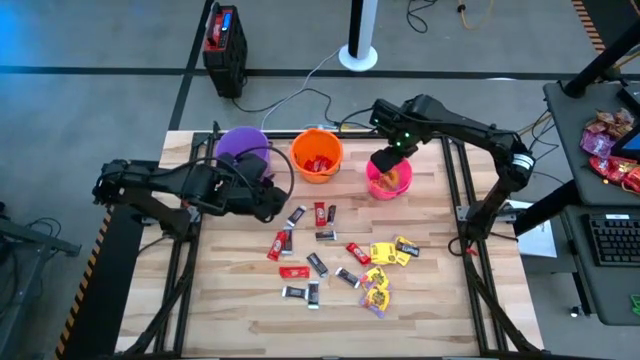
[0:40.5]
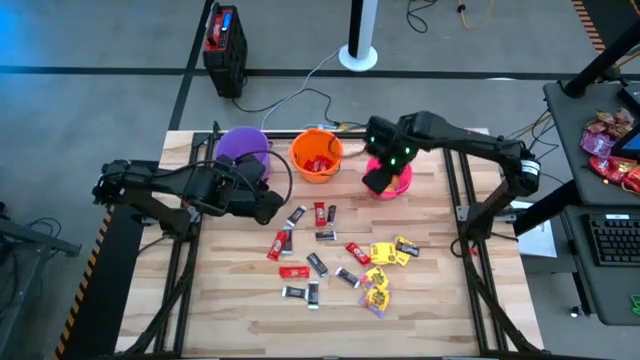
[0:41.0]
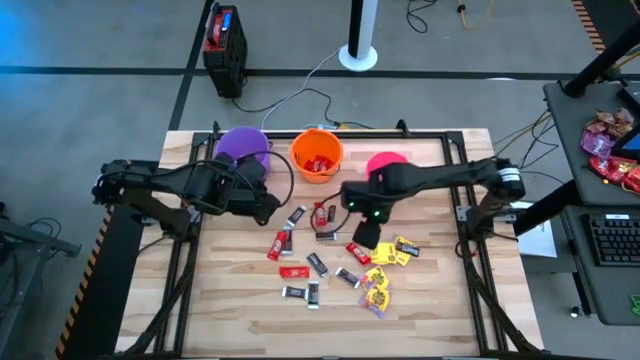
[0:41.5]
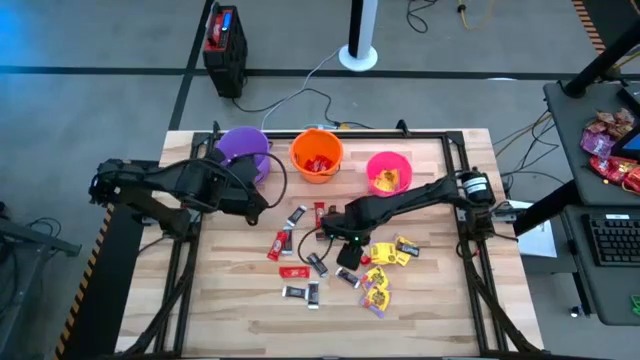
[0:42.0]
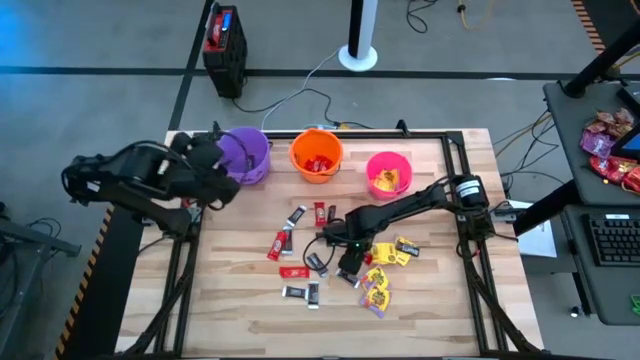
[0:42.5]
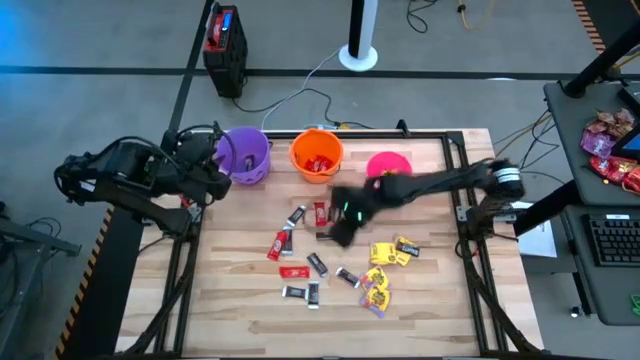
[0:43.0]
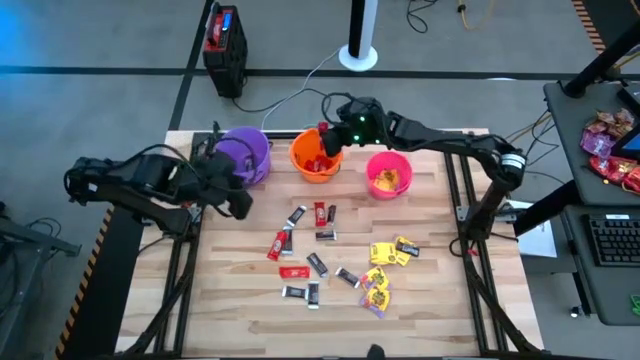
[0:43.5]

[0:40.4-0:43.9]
Task: Sort candy by brand, put in halloween buckets
Put the red candy into the orange bucket

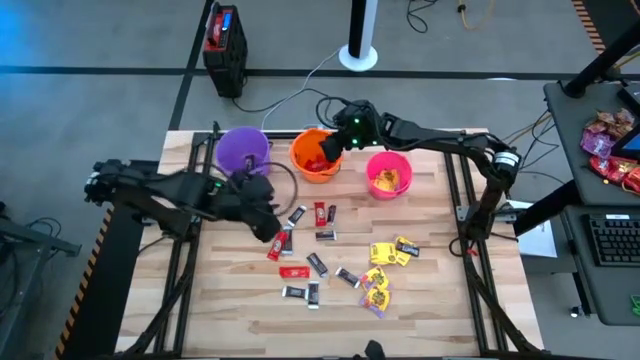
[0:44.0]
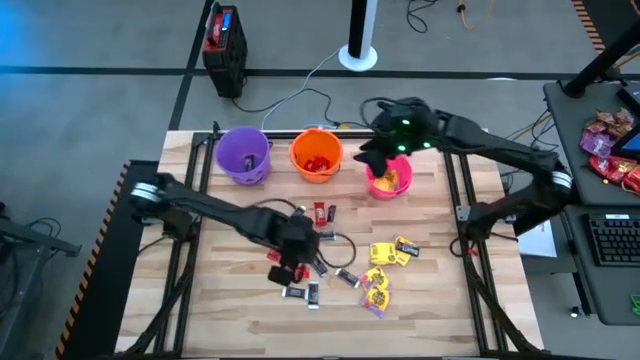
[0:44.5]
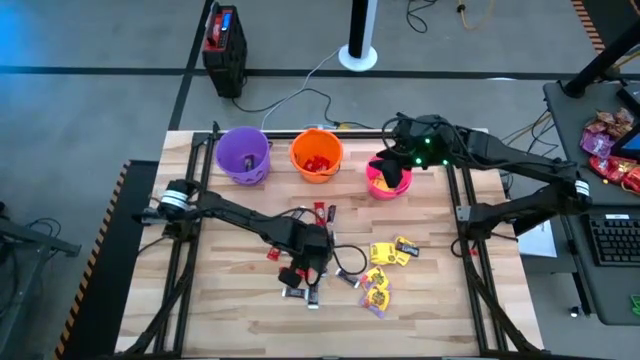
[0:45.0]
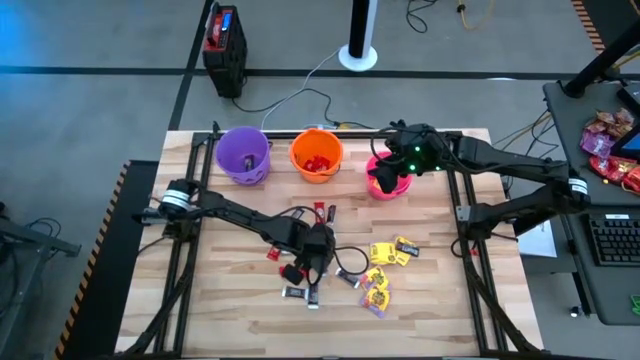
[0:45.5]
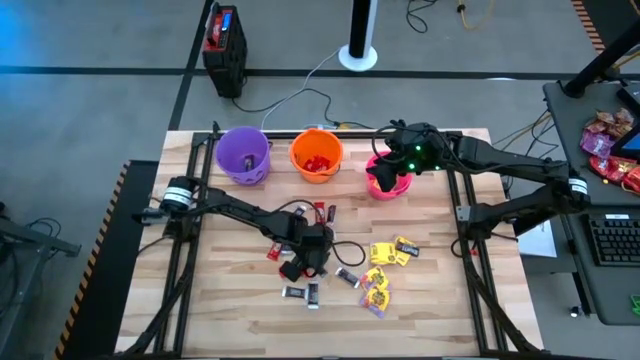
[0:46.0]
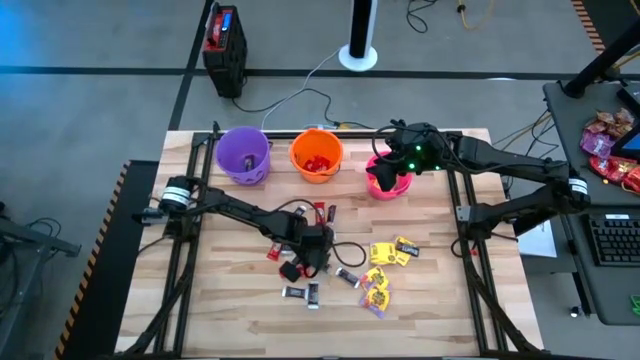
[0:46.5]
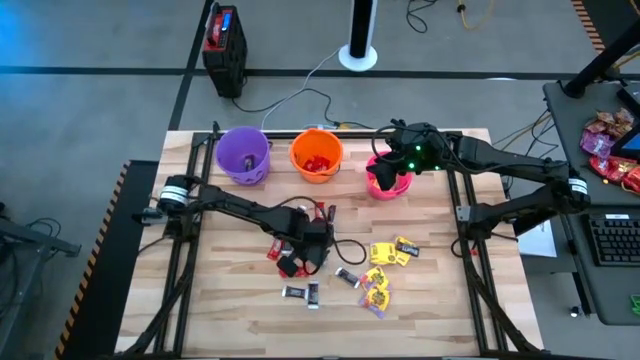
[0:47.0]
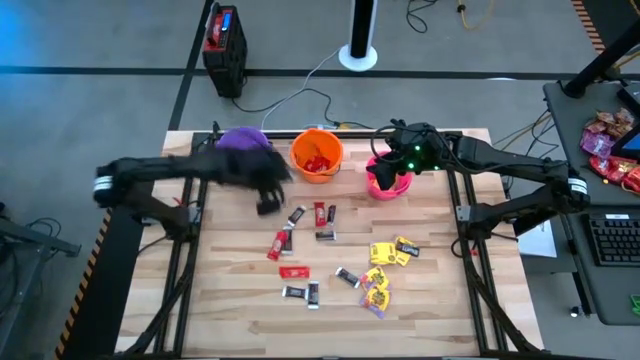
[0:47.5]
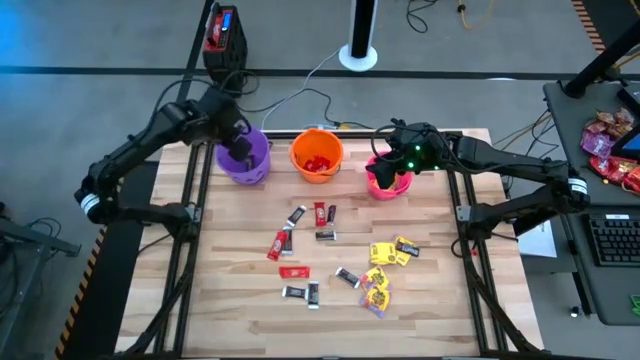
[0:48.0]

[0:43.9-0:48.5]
Put the black candy into the violet bucket

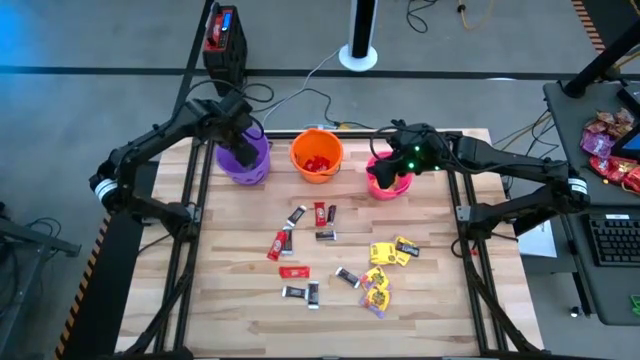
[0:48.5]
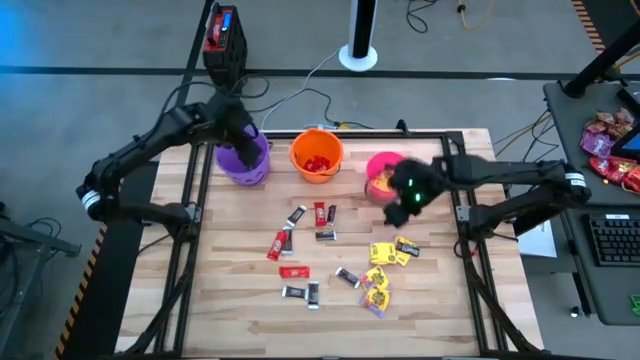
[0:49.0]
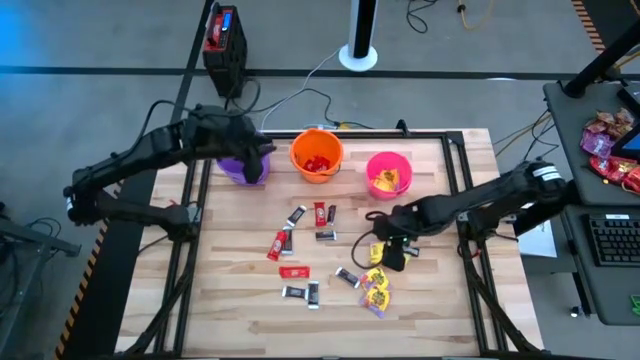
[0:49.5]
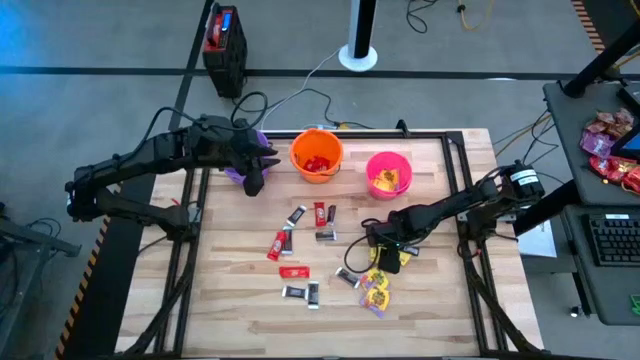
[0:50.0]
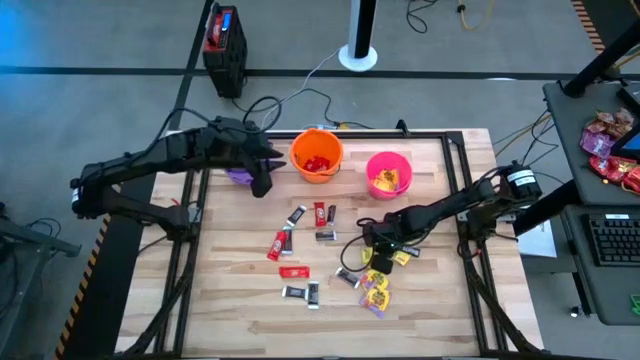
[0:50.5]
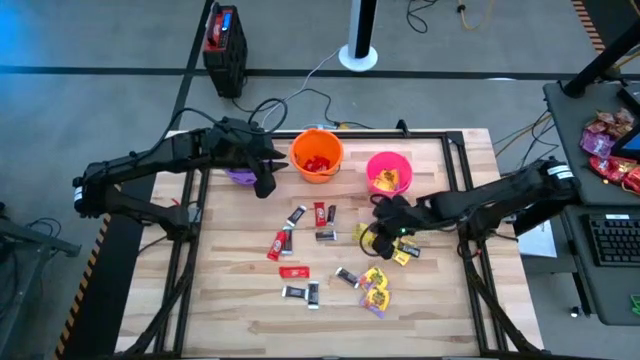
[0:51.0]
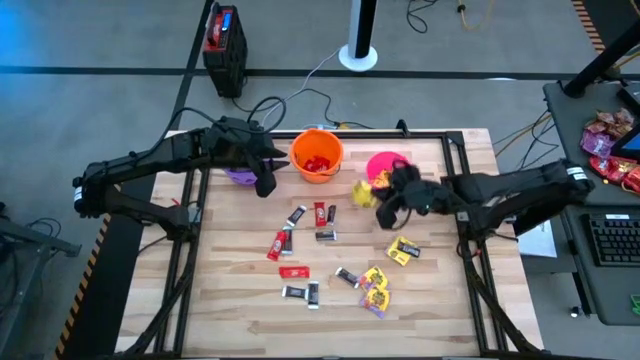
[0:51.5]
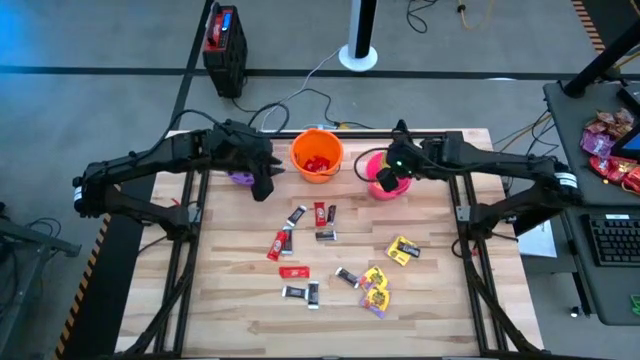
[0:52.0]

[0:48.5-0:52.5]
Put the yellow candy into the pink bucket

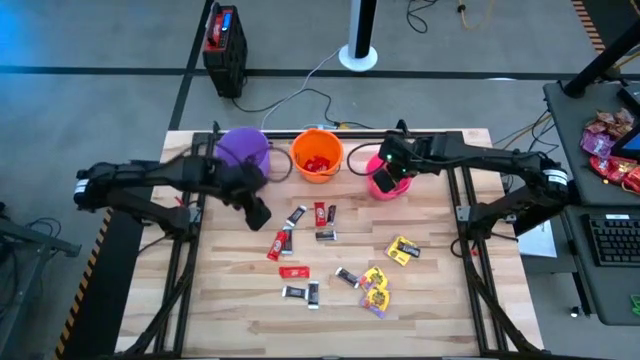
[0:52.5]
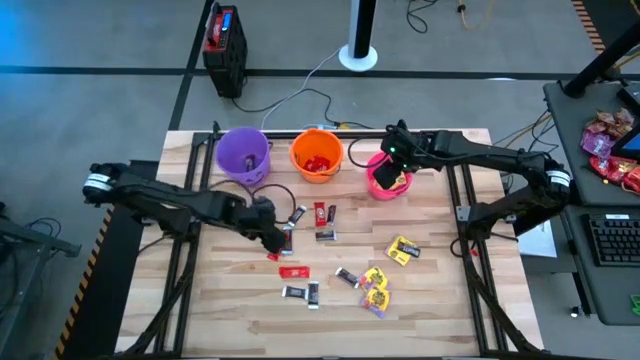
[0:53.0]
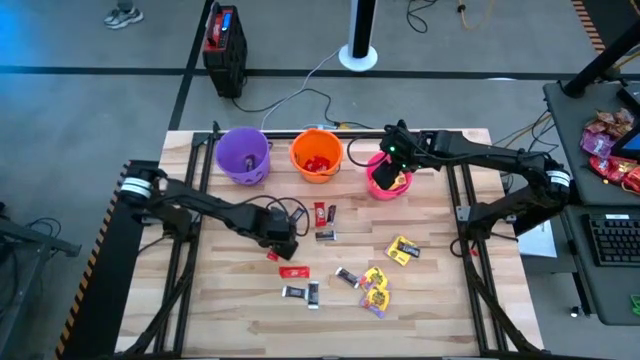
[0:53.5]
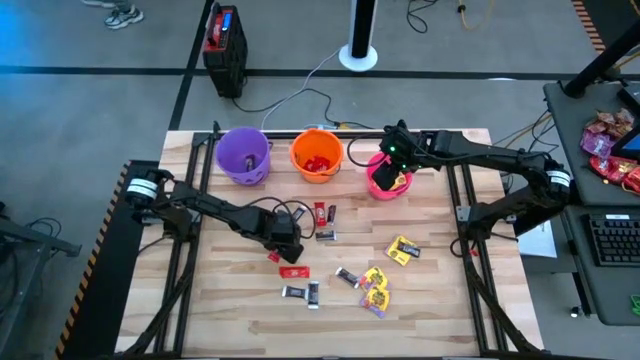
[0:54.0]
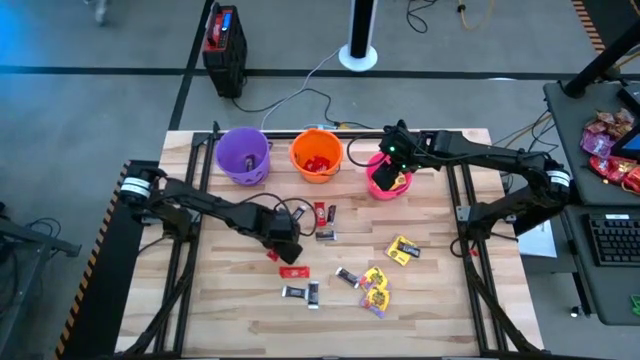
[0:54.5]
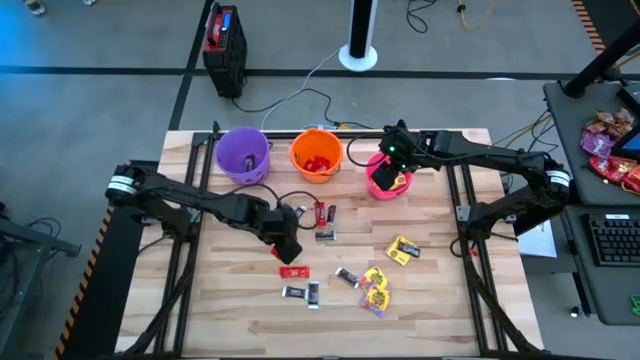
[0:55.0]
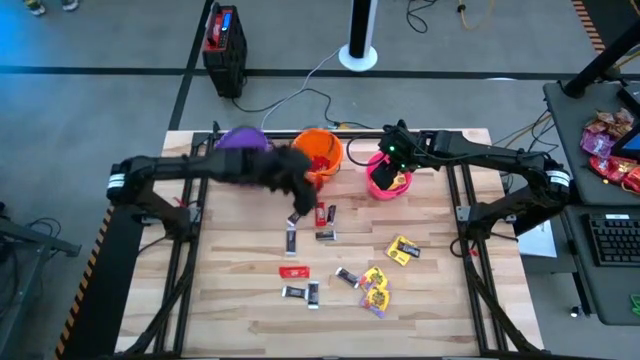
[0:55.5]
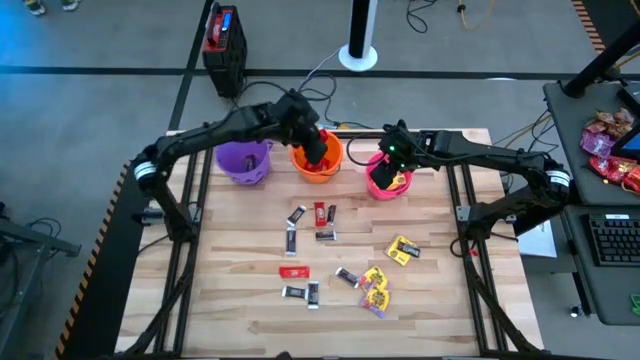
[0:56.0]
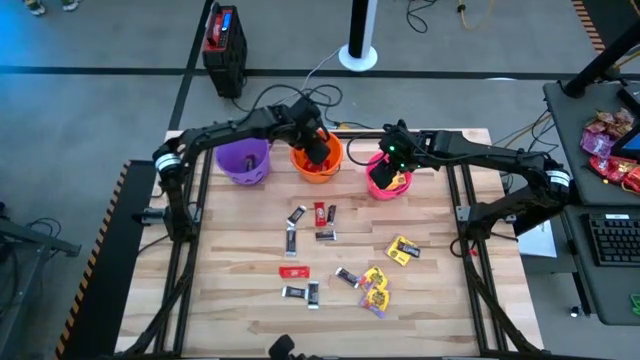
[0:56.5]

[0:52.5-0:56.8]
Put the red candy into the orange bucket

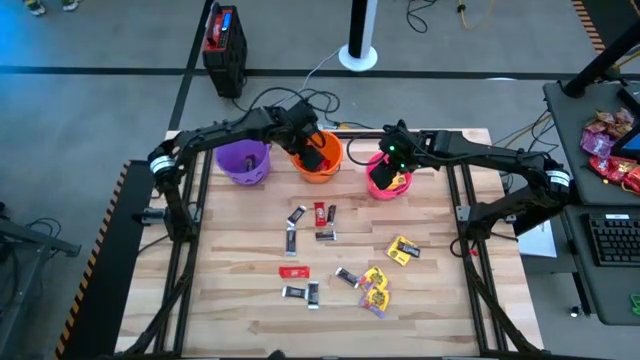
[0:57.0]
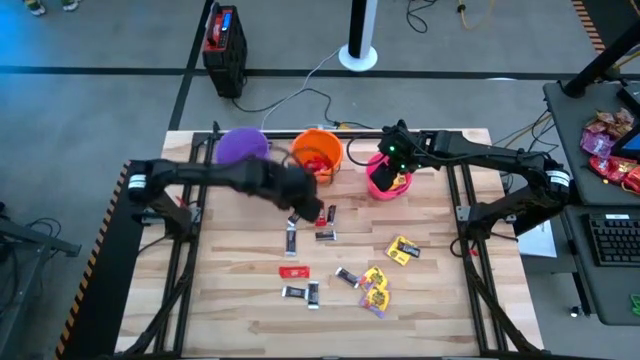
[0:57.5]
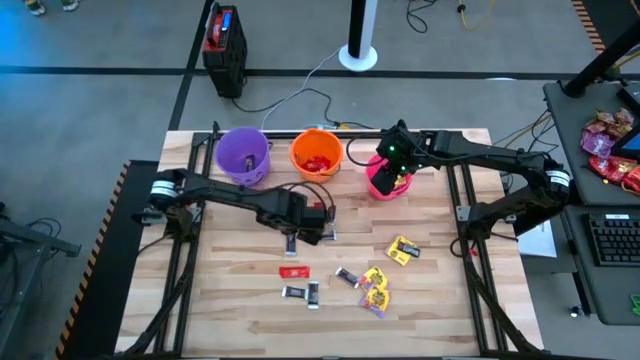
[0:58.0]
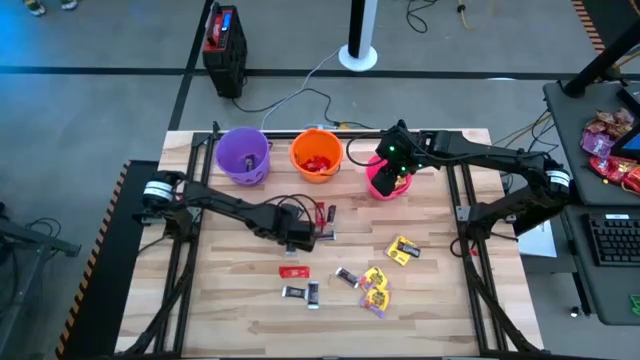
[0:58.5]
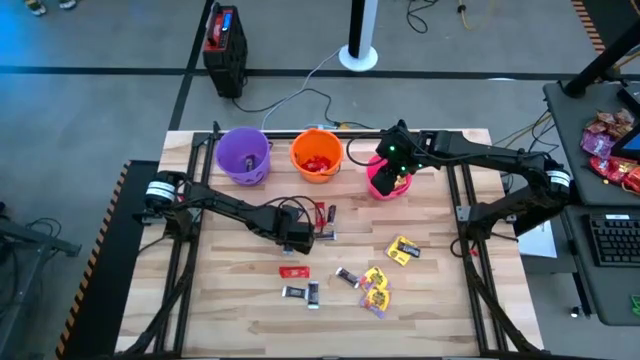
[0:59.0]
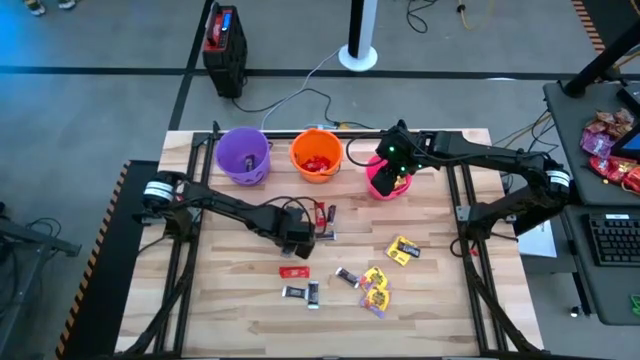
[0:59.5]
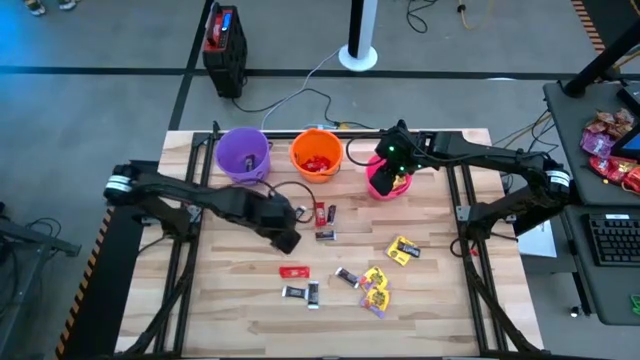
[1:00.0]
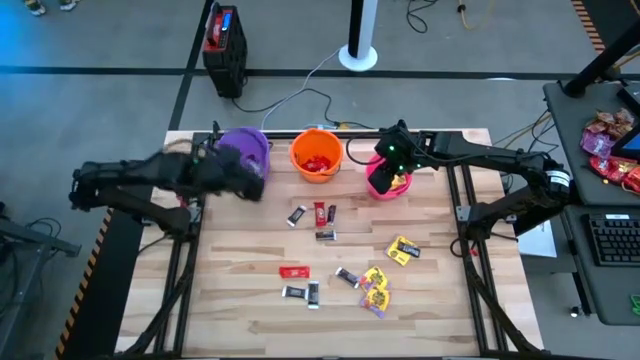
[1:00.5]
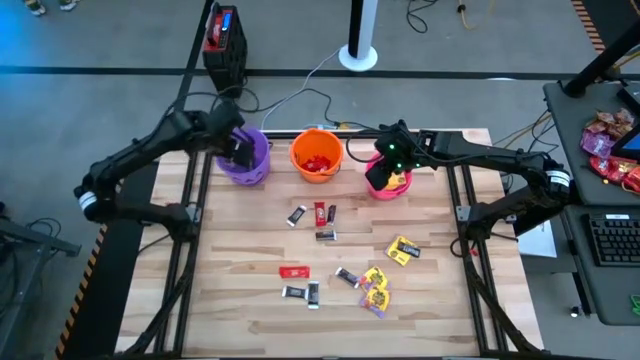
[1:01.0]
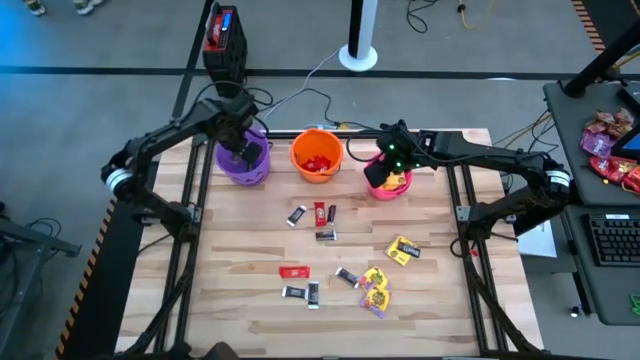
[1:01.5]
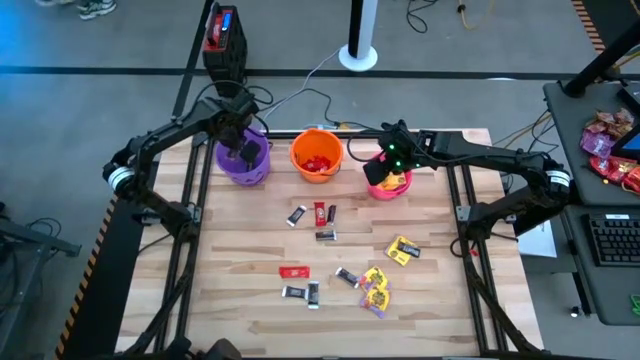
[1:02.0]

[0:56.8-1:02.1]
Put the black candy into the violet bucket
